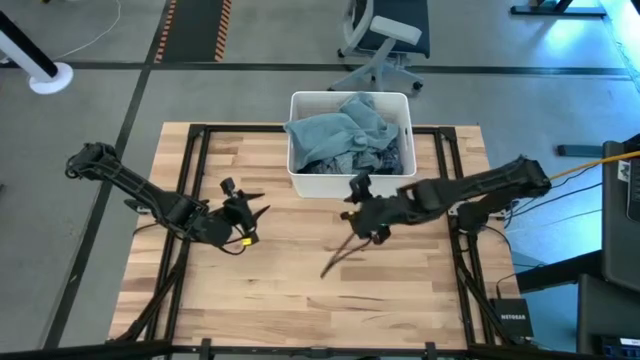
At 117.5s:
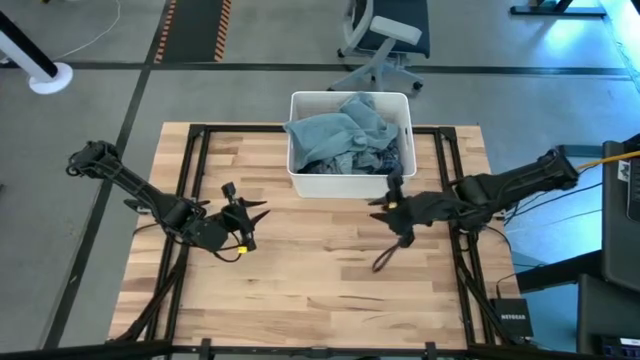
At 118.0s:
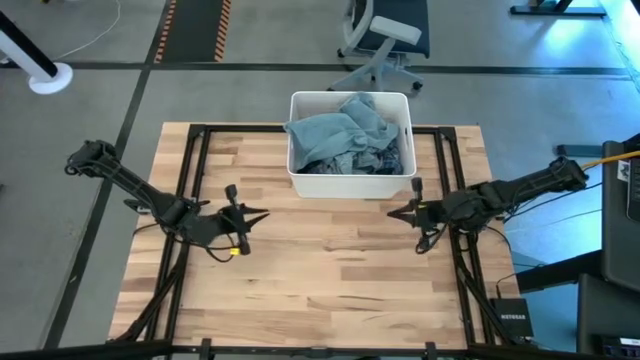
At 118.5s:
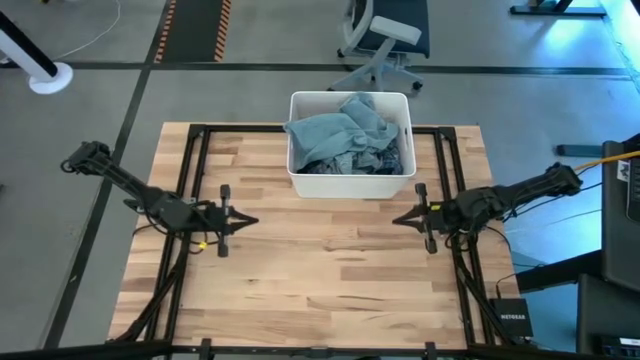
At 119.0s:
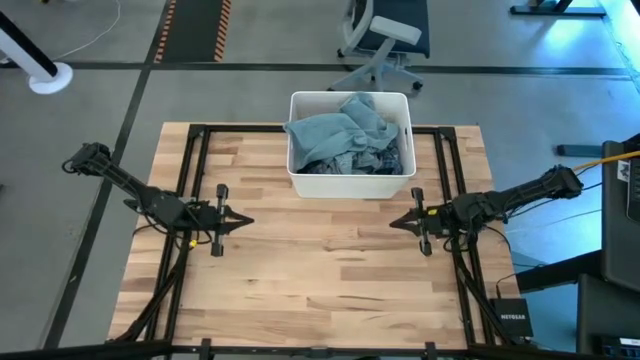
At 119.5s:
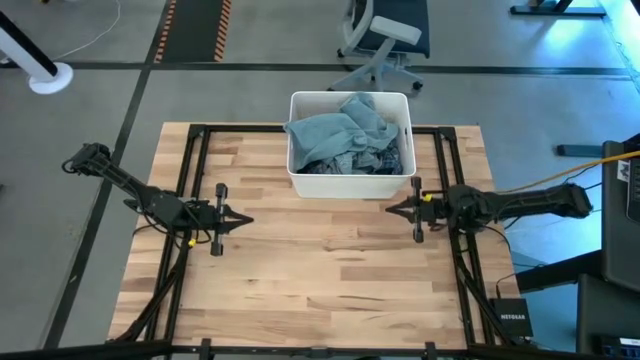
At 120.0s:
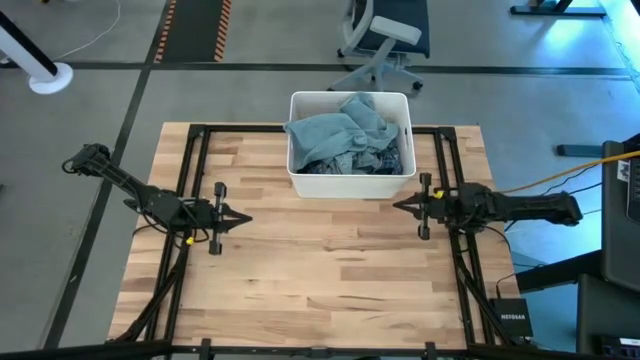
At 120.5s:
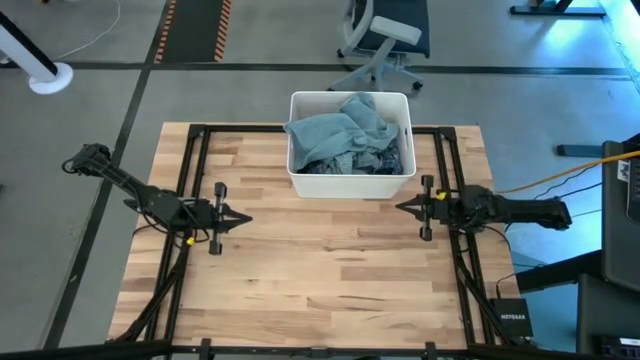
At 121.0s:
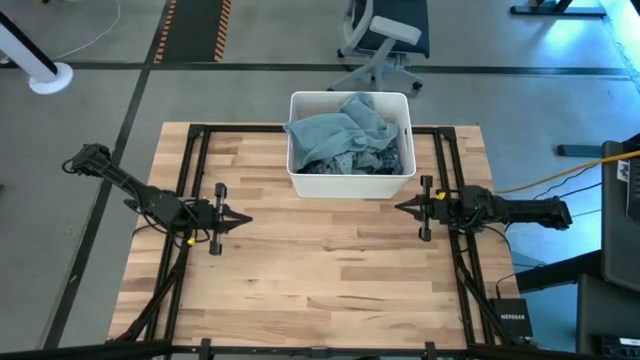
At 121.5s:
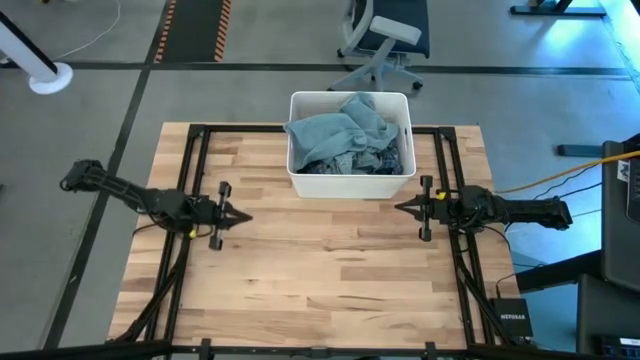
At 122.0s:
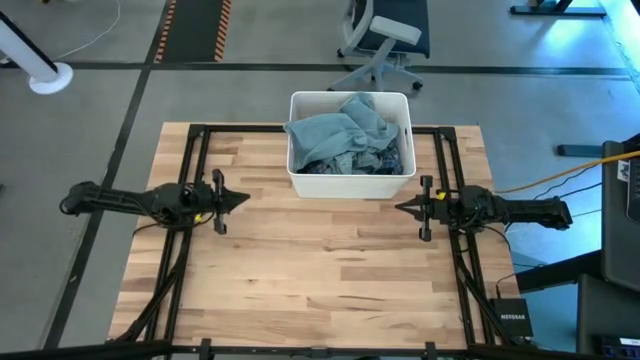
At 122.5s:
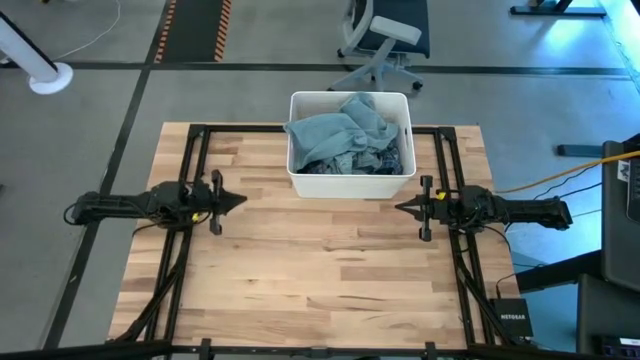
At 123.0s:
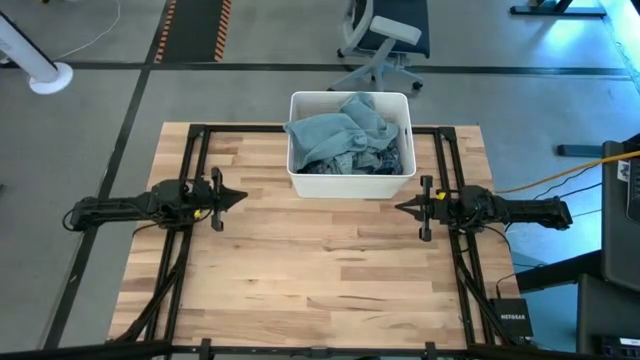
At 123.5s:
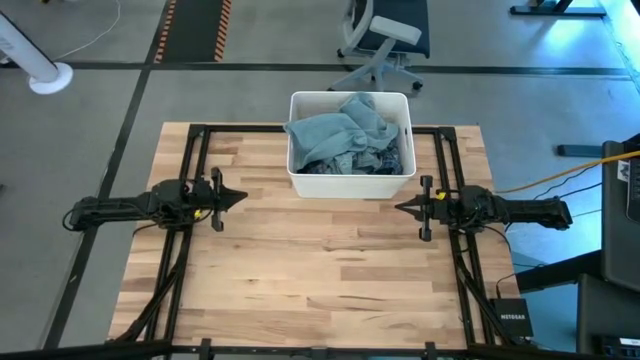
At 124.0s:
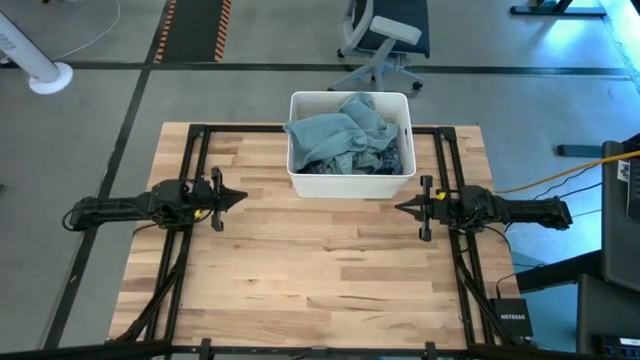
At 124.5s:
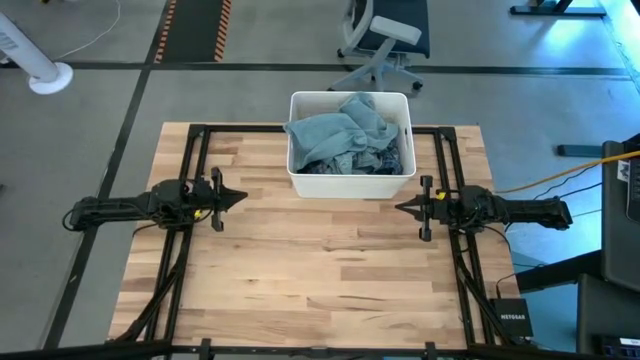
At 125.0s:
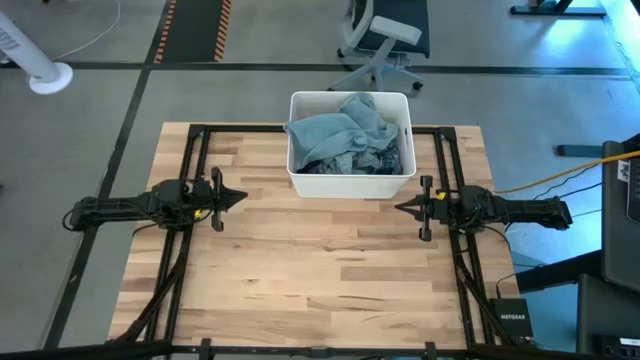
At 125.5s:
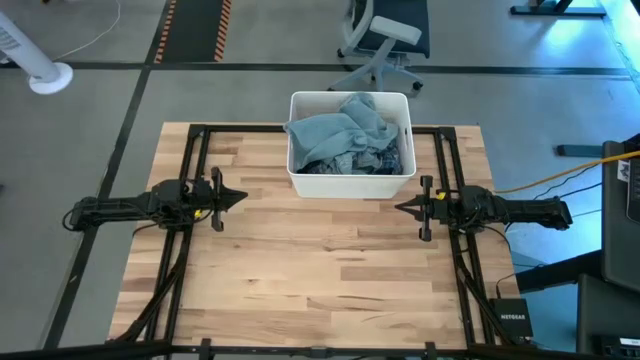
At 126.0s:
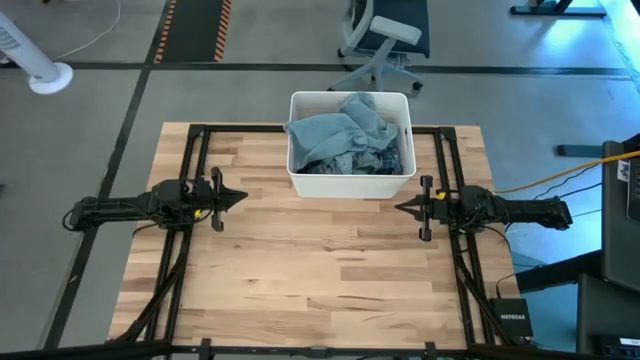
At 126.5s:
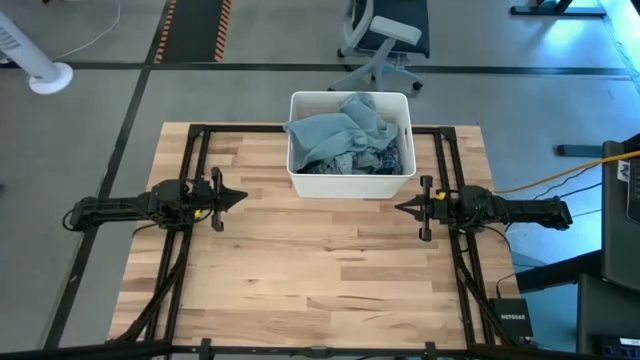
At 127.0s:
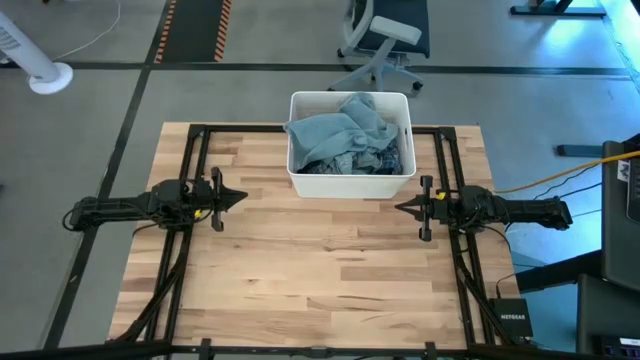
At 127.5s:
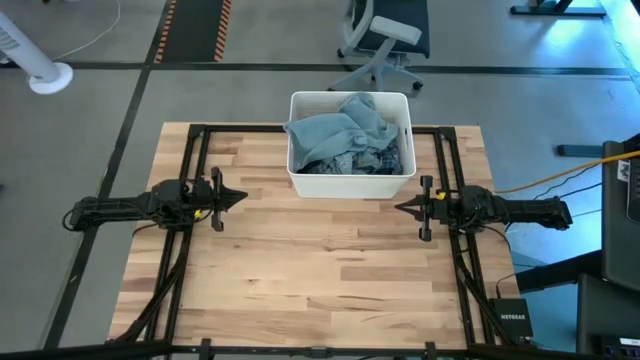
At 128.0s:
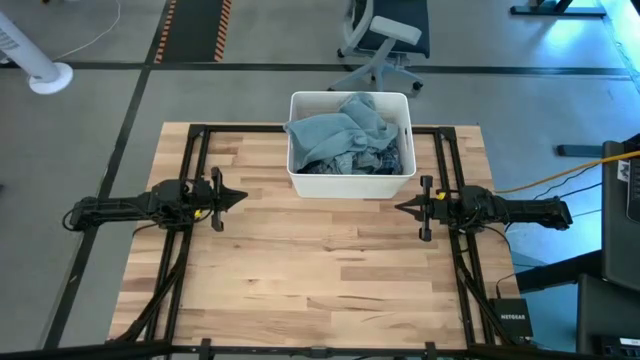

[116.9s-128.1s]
Task: Sort clothes
Return to Home Position

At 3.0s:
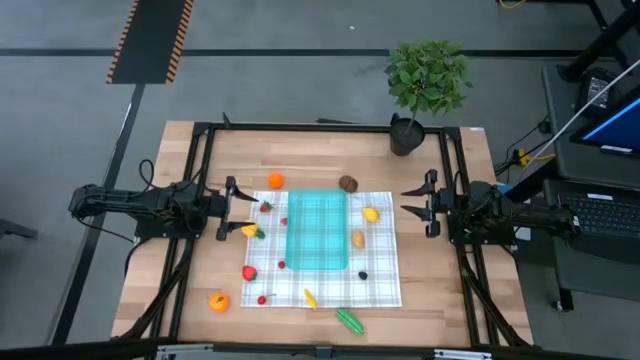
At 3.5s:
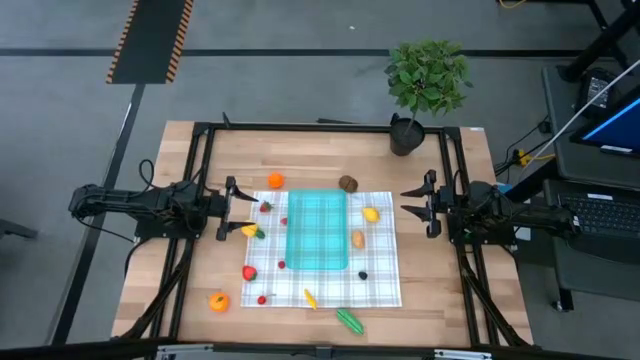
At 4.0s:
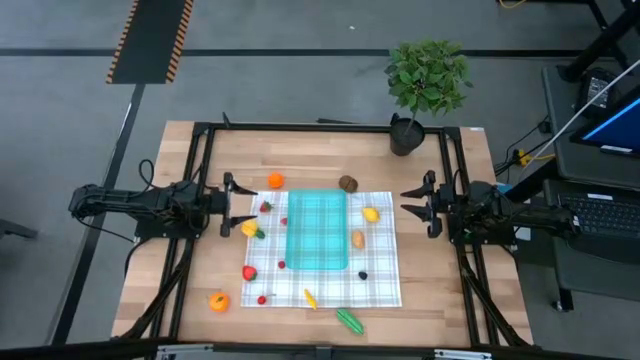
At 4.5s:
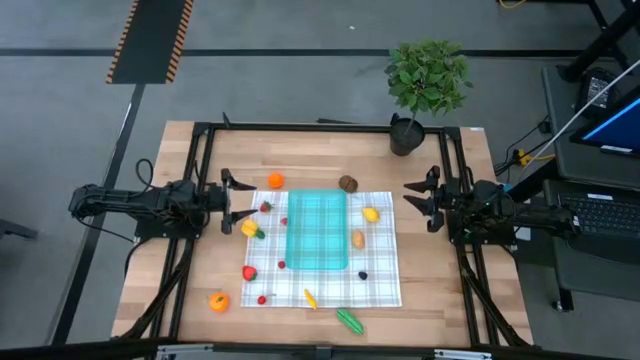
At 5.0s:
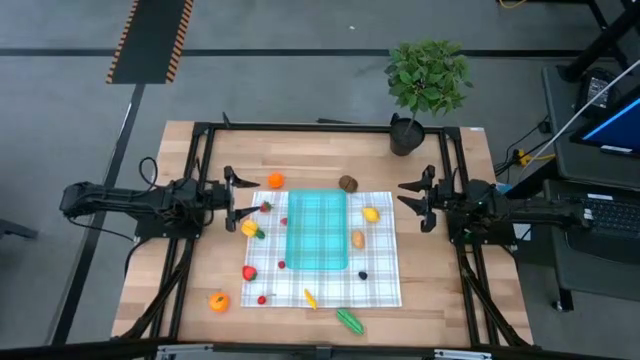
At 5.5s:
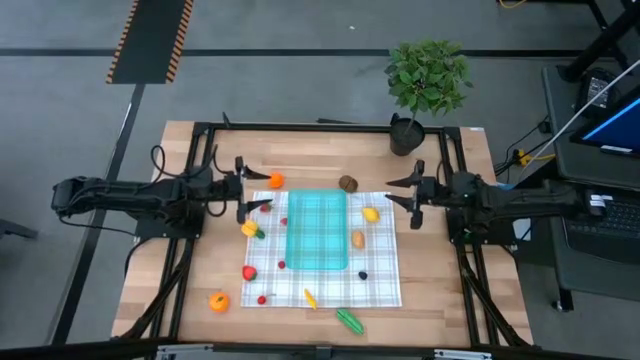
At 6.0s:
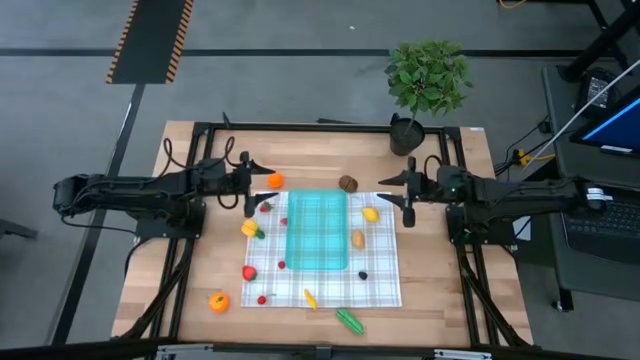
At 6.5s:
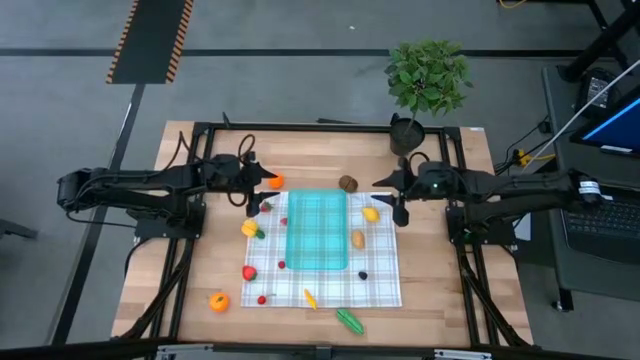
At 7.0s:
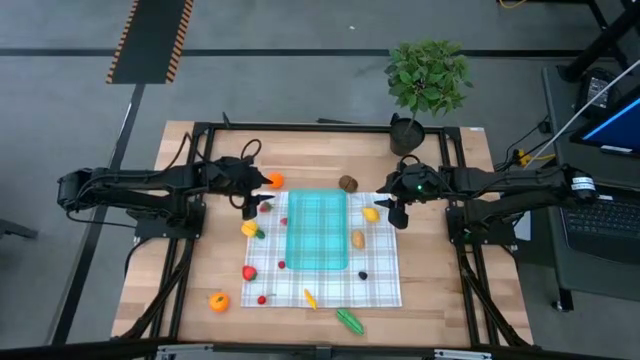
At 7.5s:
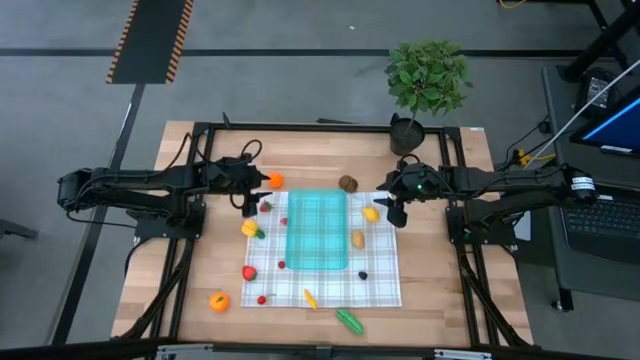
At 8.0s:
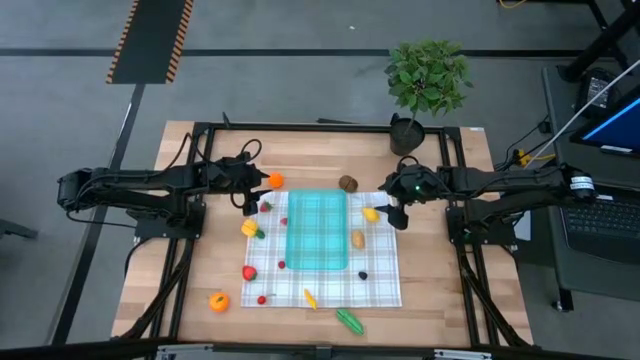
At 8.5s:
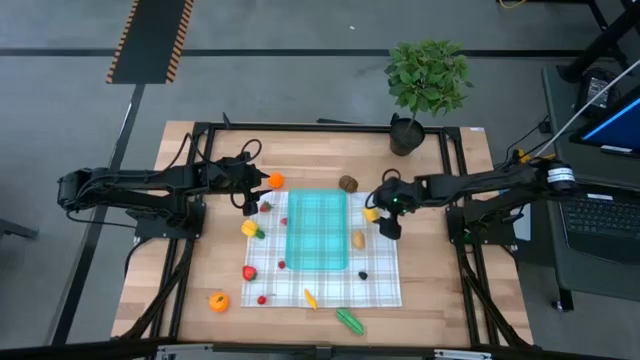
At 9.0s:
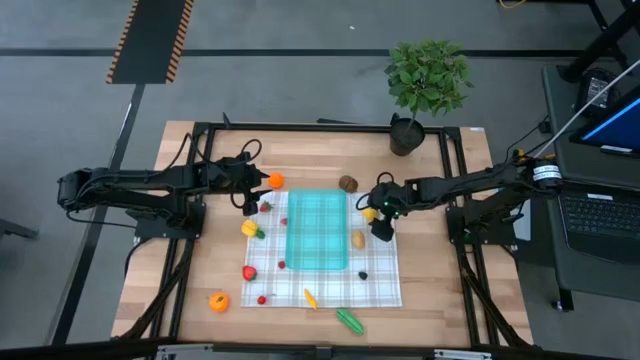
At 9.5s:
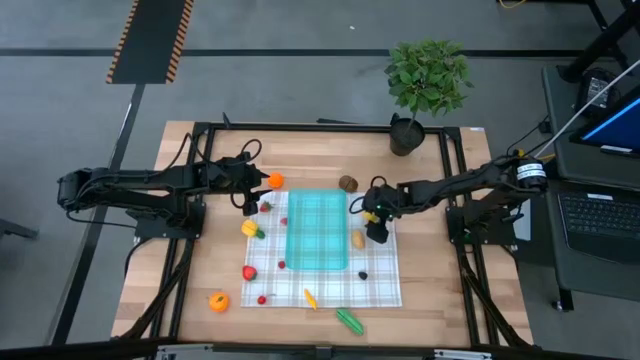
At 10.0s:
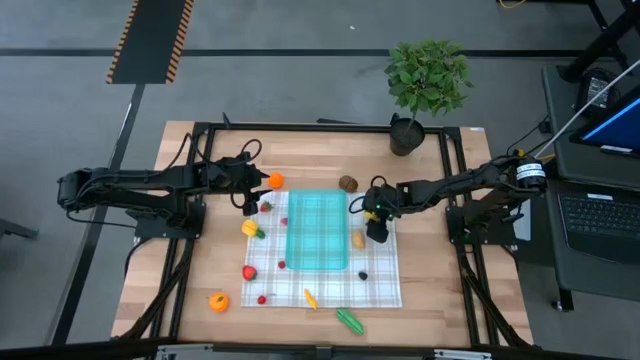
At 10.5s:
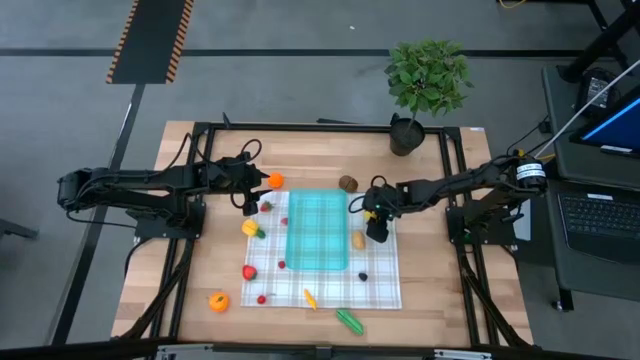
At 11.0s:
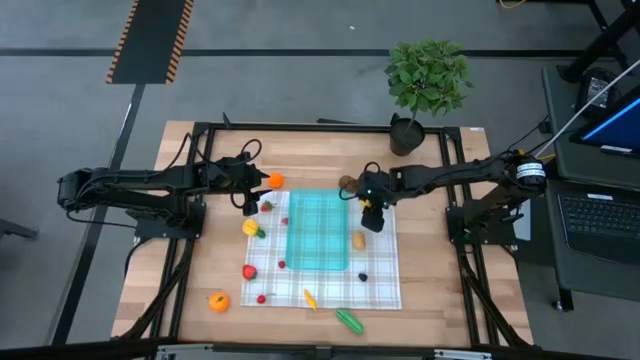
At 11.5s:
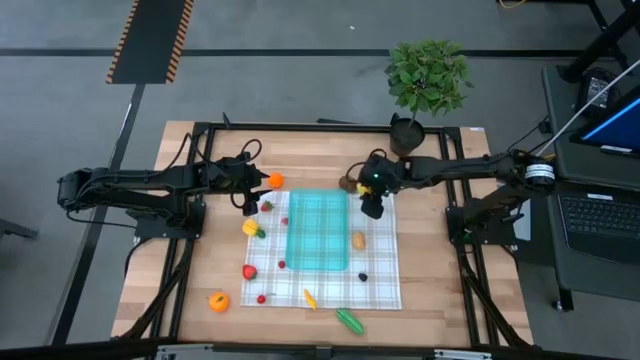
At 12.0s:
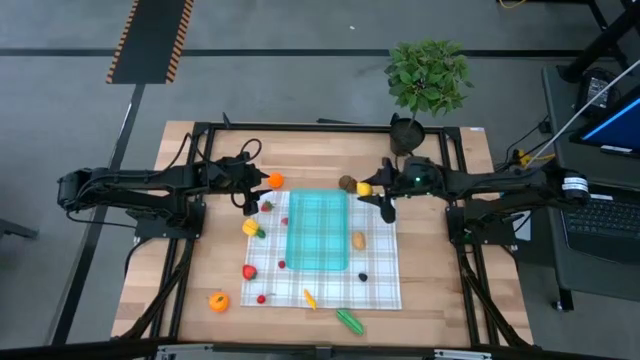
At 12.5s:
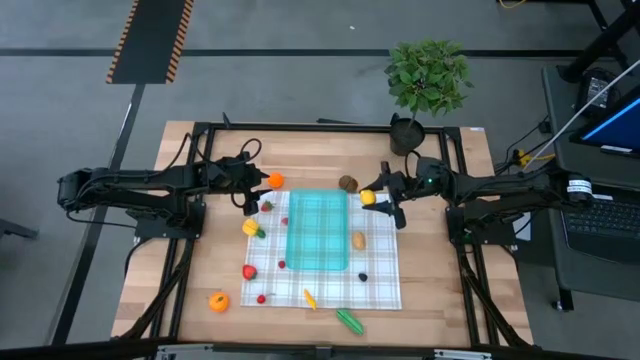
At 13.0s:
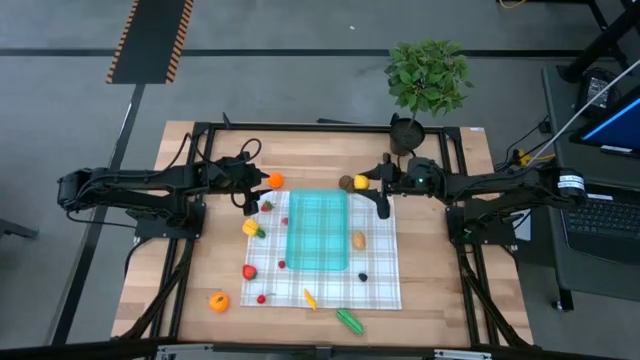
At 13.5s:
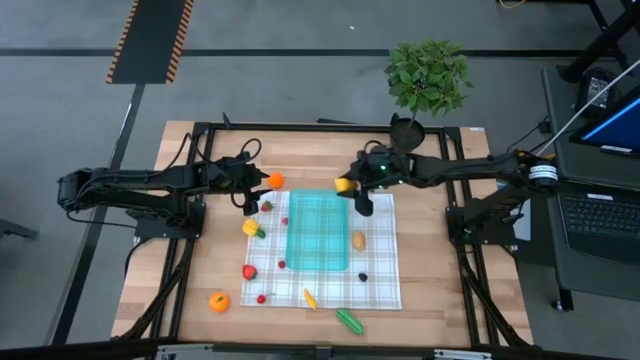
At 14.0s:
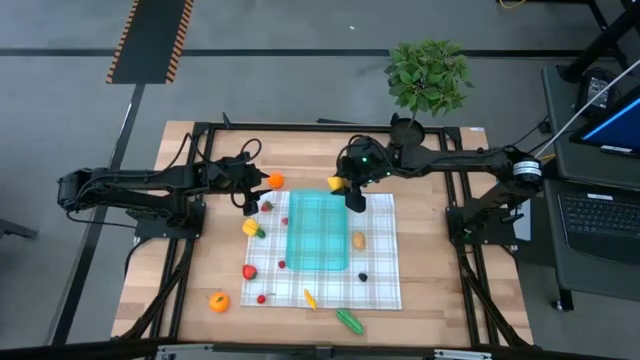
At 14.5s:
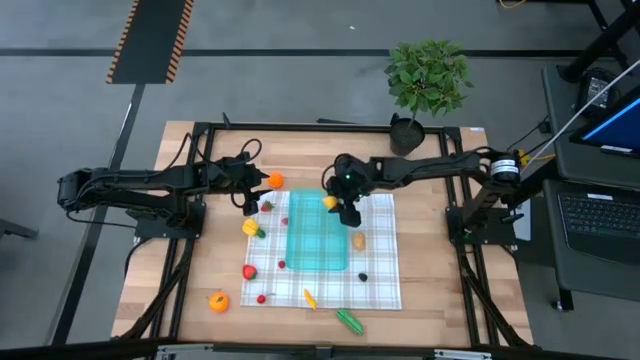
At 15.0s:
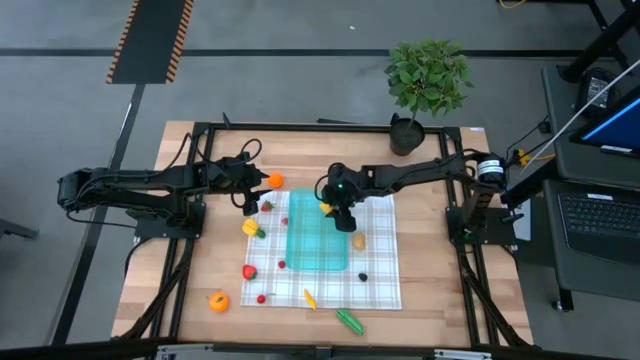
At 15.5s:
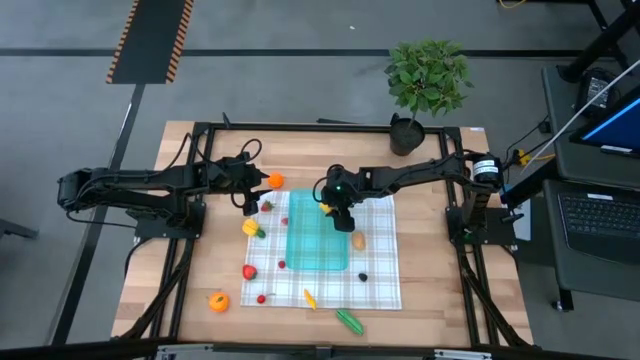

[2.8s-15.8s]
Task: Pick and placing Produce into tupperware
Put the yellow lemon into the blue bin
